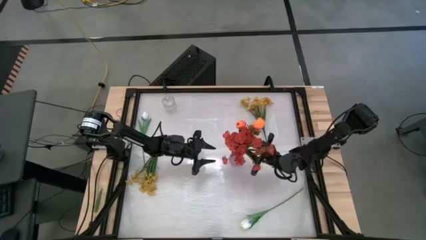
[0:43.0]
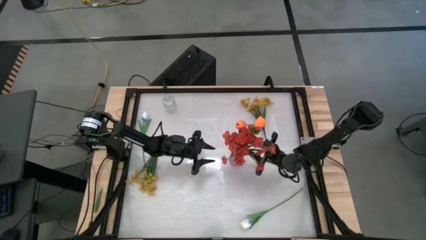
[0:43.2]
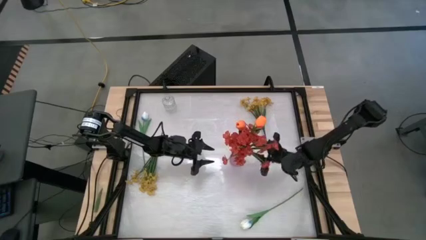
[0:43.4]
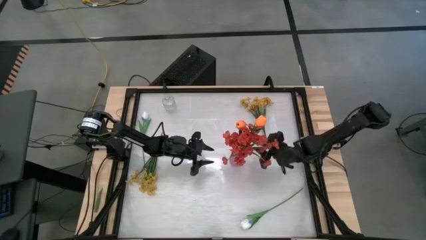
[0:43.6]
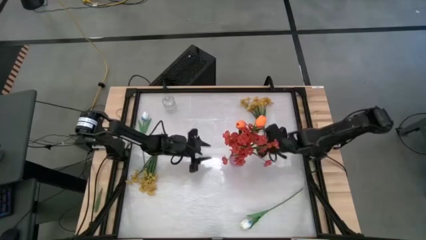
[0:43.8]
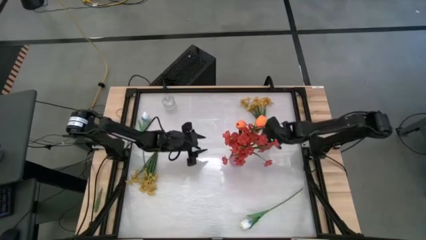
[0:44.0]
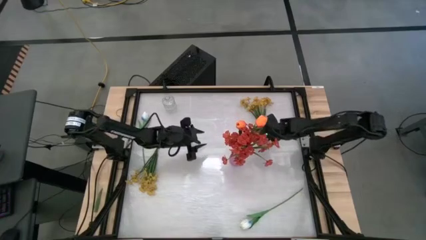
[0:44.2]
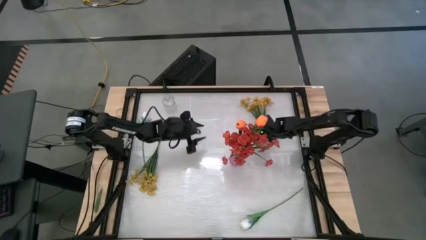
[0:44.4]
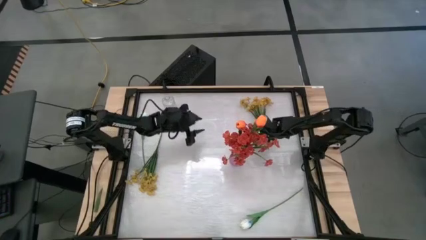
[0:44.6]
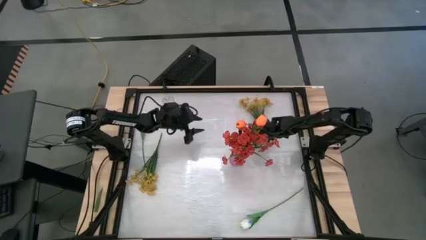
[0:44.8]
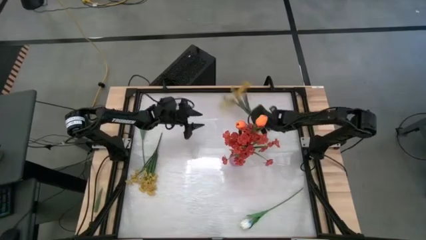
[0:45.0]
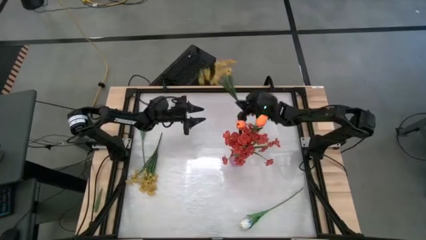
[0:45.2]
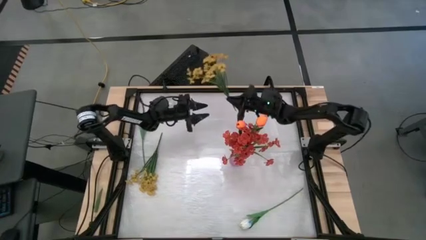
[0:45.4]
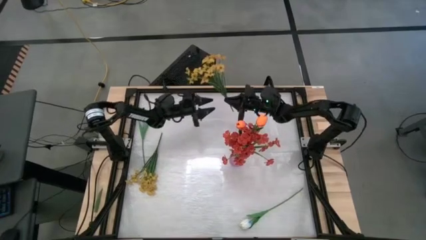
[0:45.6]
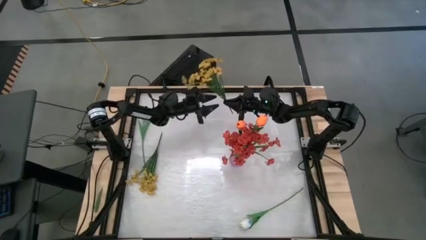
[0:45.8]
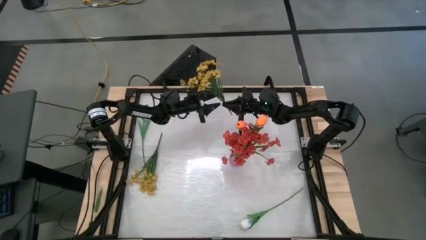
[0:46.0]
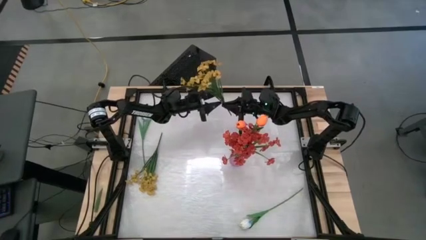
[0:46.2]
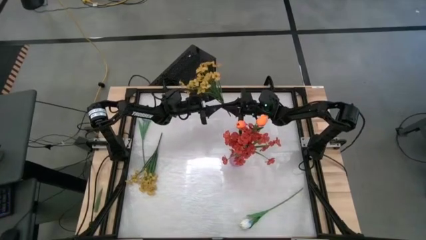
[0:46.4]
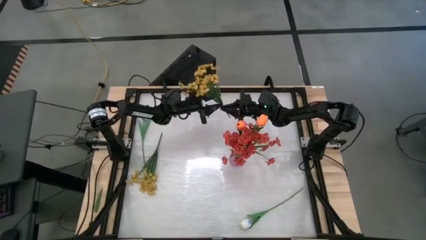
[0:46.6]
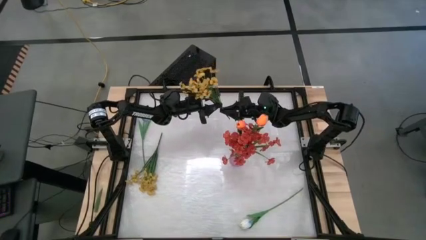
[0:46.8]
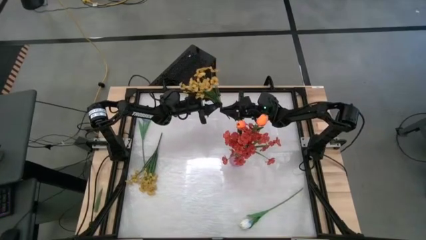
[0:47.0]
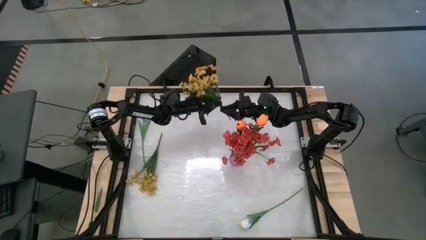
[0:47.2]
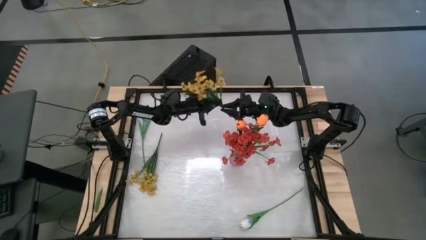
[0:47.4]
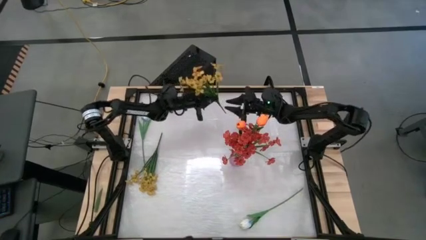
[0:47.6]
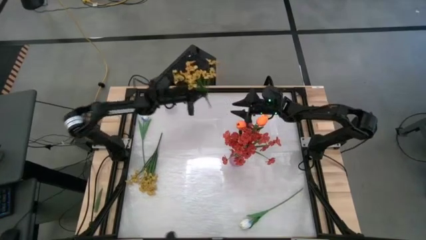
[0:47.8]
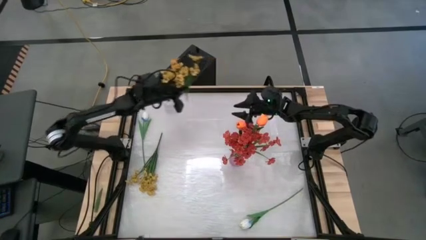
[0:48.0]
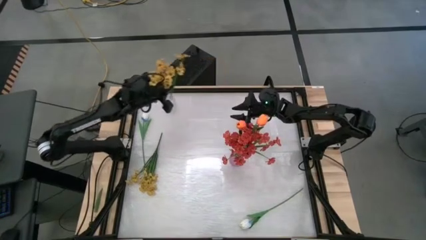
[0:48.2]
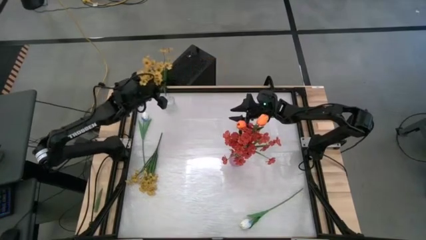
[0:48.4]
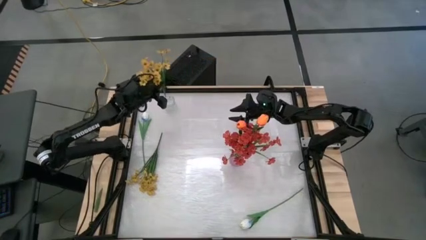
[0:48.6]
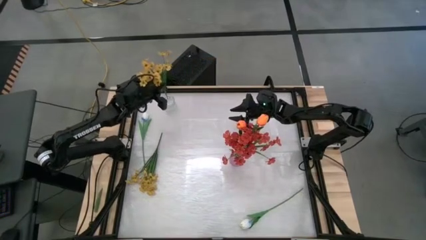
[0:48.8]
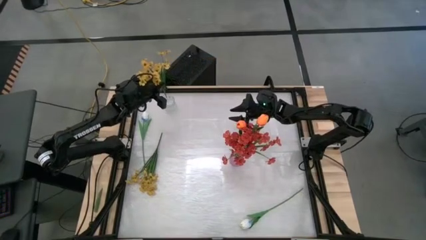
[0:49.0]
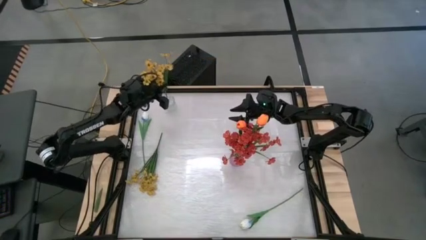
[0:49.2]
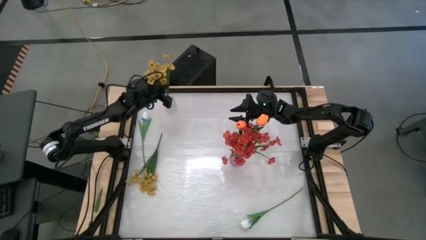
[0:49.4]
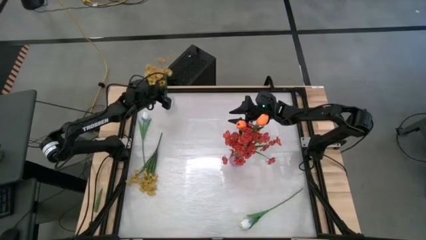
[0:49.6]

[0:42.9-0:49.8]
Task: Sort flowers into vase by color
Put the yellow flowers into the transparent vase

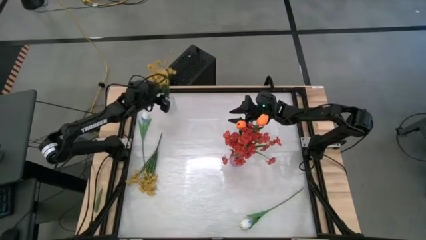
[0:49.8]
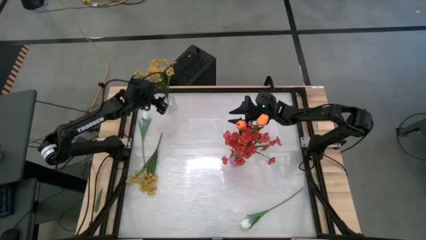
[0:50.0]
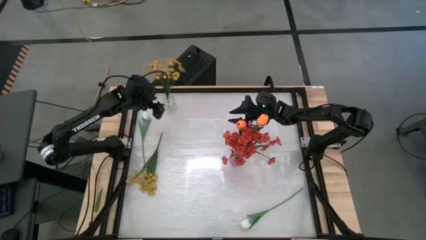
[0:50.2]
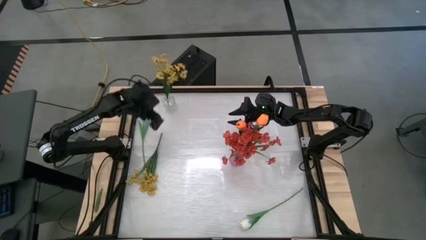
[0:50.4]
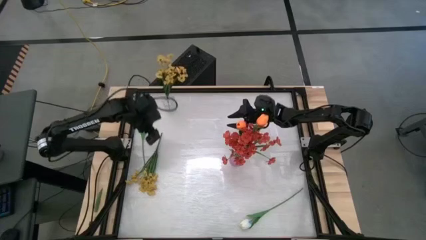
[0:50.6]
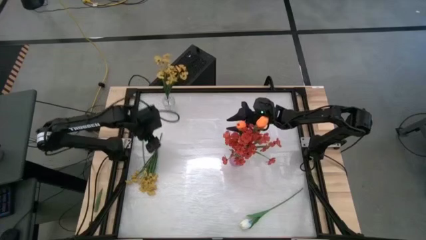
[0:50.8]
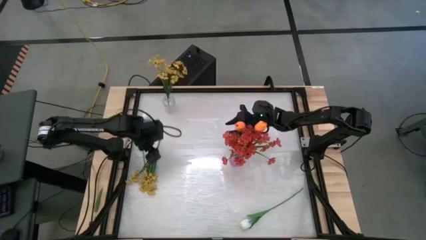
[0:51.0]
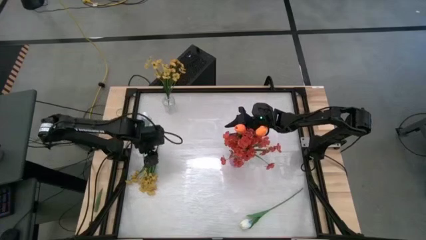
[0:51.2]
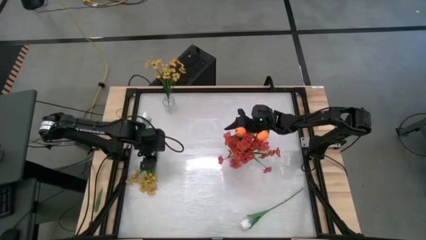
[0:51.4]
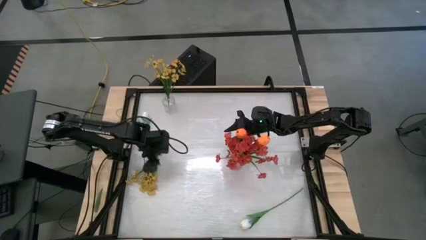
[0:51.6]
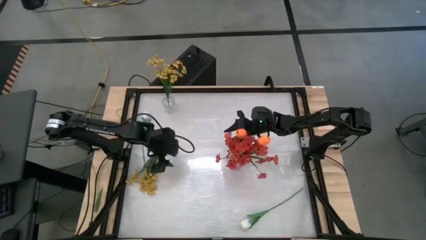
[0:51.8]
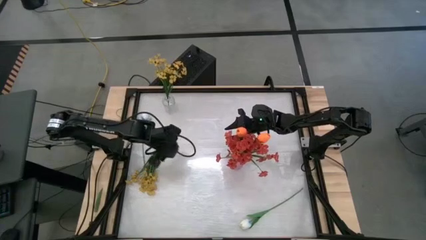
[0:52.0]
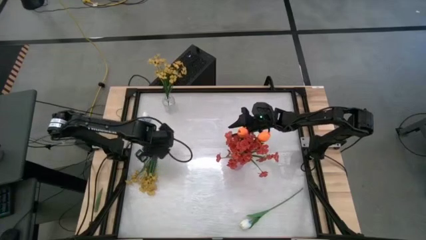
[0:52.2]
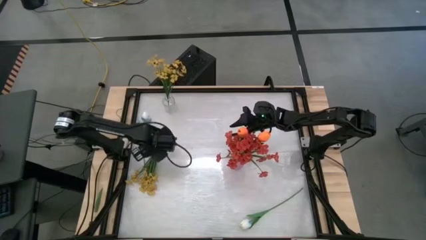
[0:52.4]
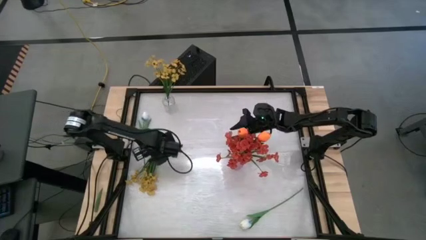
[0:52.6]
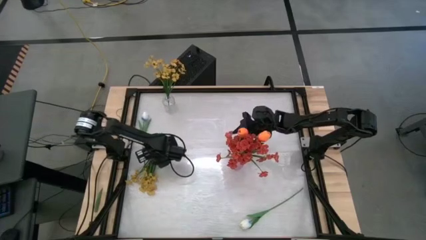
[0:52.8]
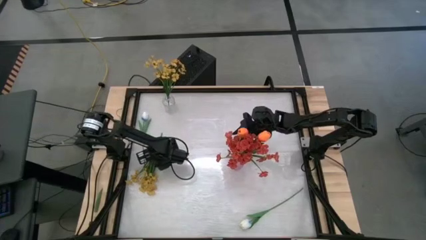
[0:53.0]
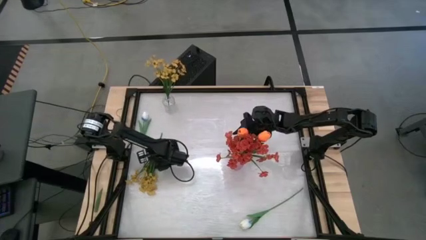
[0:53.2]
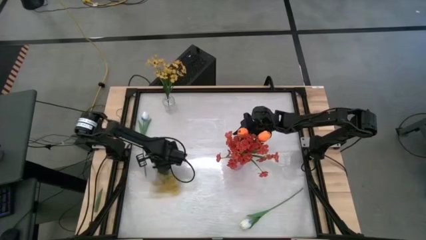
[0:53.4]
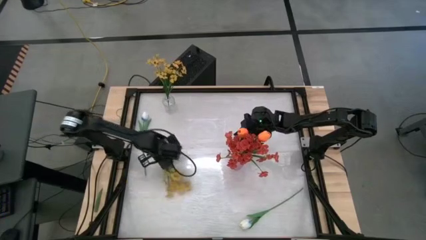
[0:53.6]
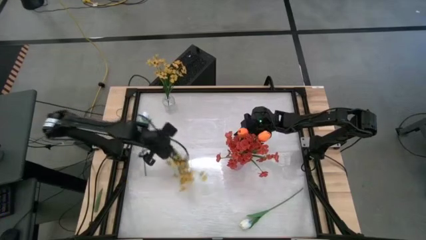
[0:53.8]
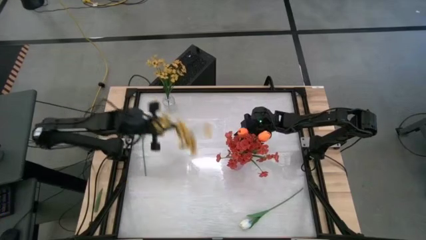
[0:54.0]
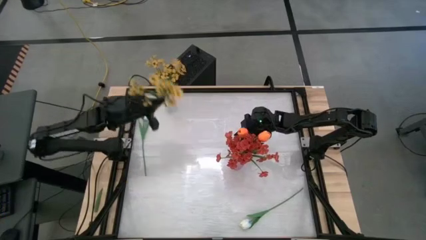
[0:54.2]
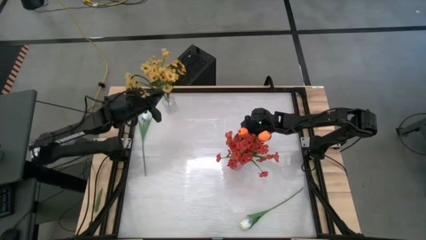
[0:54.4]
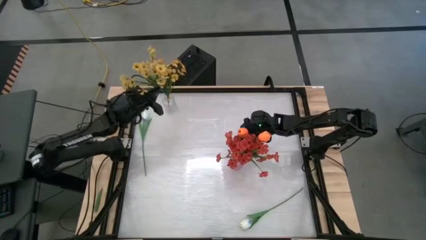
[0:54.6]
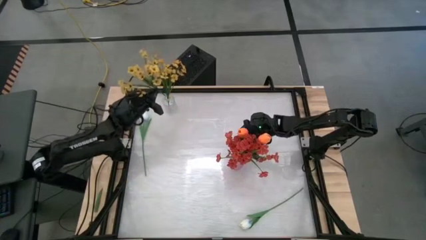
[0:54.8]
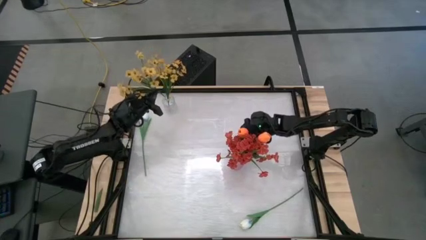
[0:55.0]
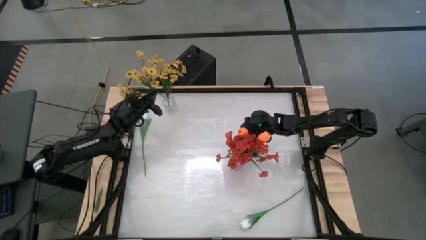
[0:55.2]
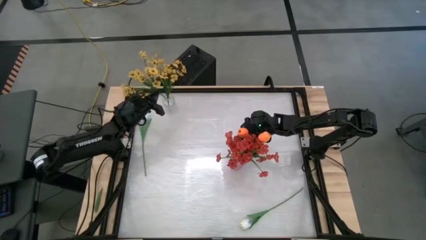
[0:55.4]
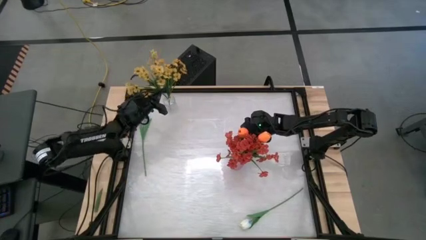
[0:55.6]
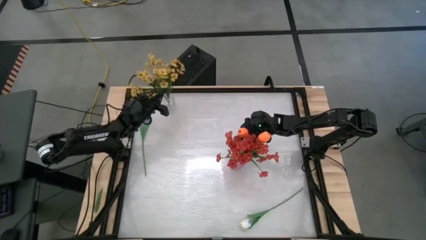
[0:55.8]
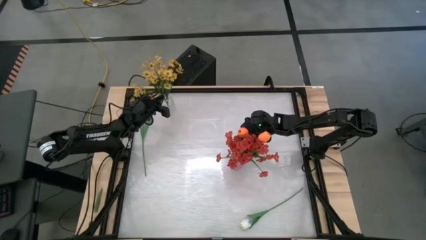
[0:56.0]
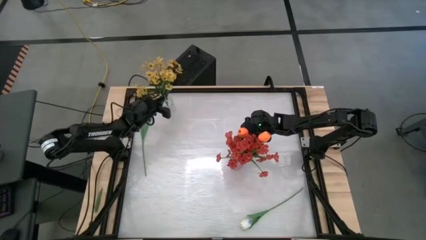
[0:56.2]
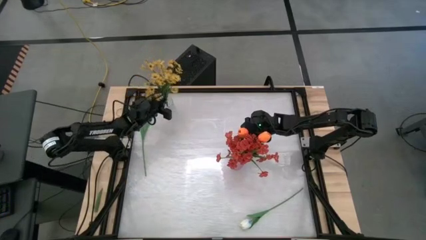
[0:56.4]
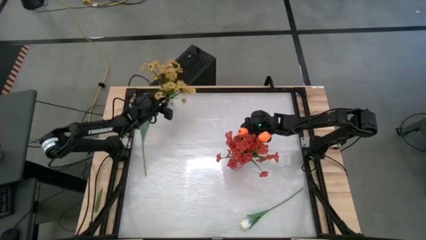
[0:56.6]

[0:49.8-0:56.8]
Put the yellow flowers into the transparent vase
